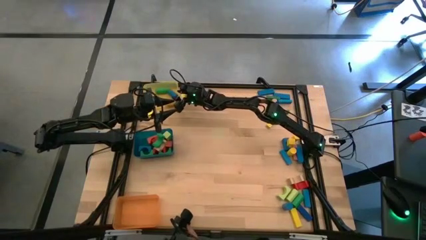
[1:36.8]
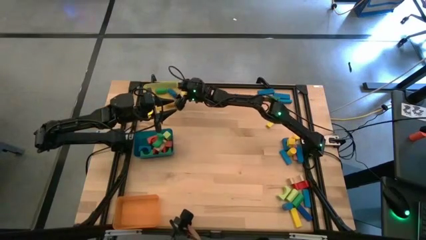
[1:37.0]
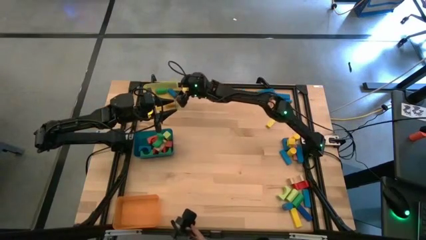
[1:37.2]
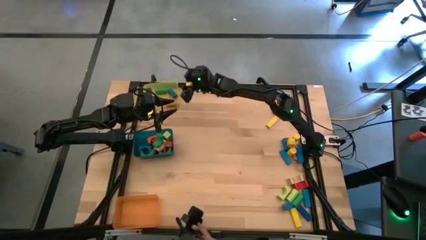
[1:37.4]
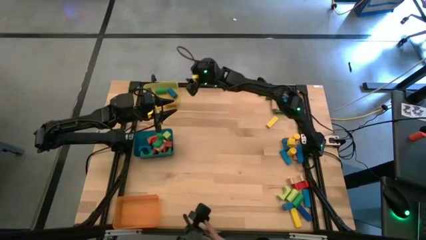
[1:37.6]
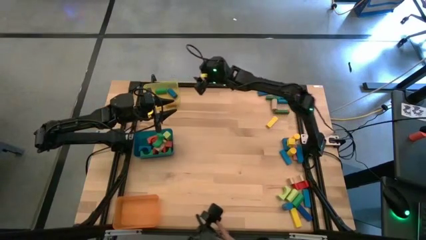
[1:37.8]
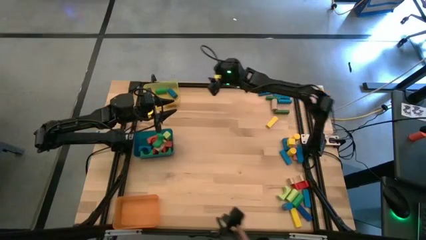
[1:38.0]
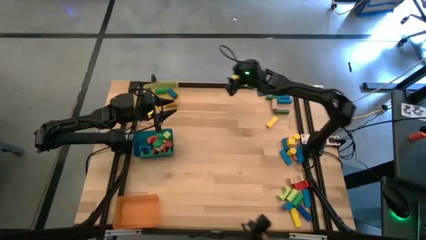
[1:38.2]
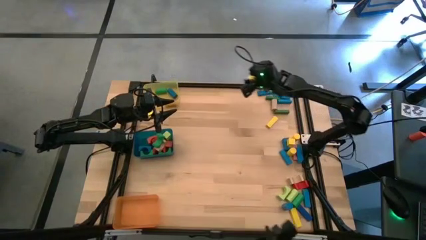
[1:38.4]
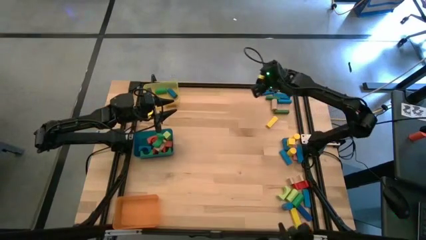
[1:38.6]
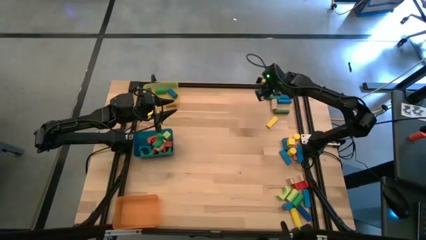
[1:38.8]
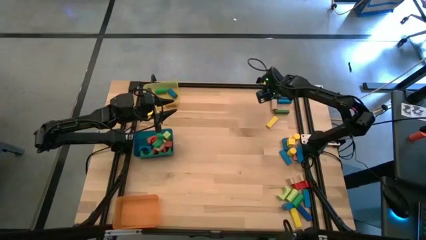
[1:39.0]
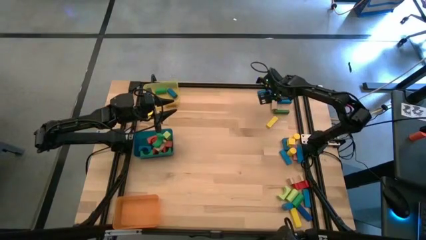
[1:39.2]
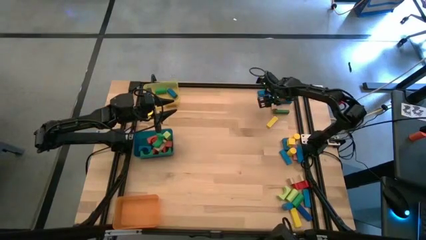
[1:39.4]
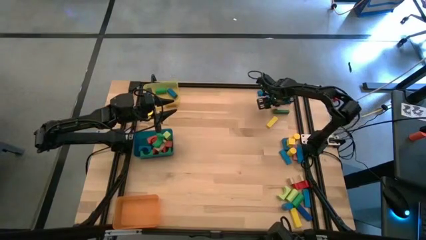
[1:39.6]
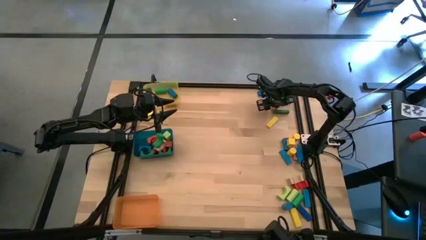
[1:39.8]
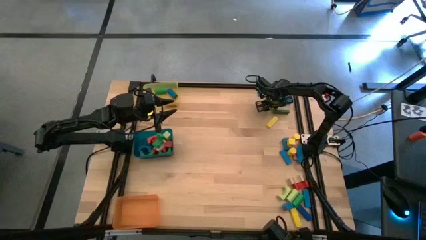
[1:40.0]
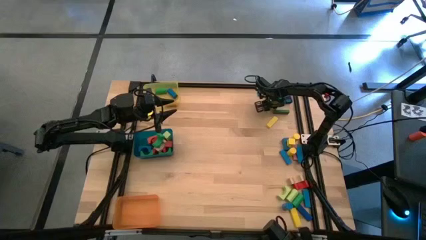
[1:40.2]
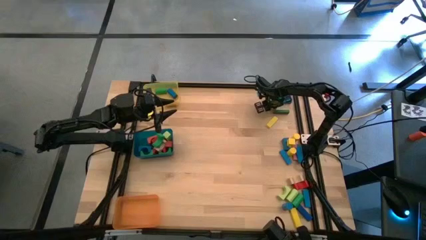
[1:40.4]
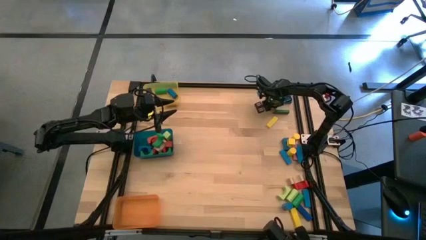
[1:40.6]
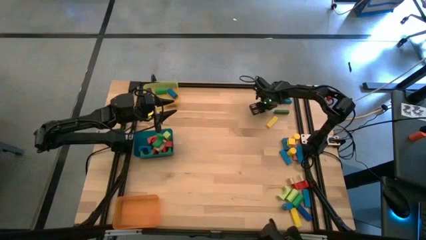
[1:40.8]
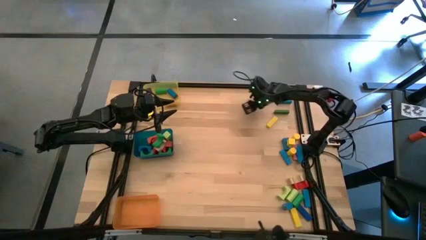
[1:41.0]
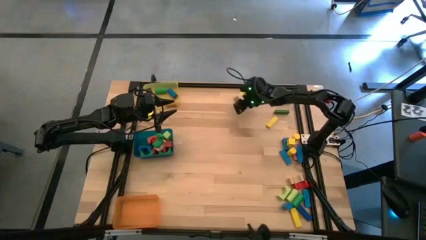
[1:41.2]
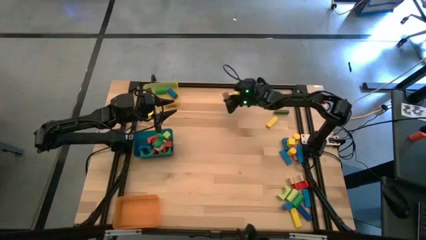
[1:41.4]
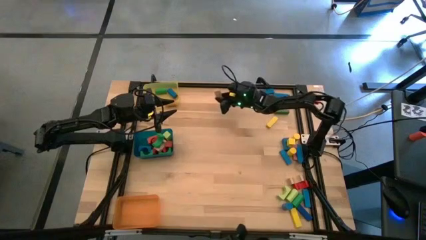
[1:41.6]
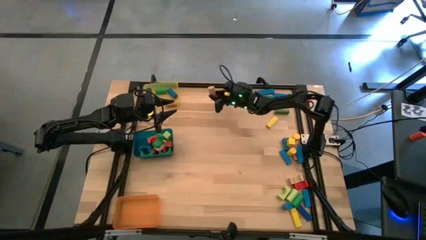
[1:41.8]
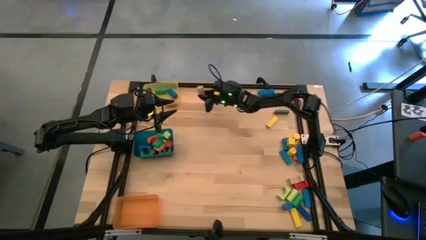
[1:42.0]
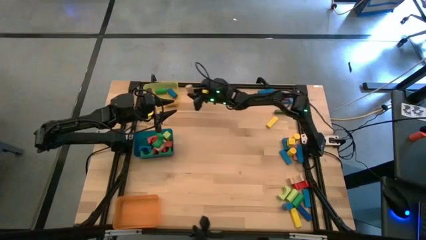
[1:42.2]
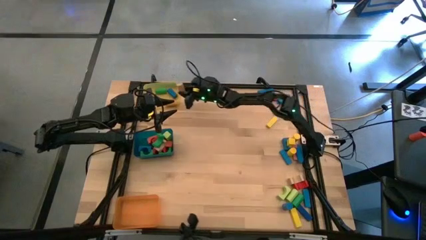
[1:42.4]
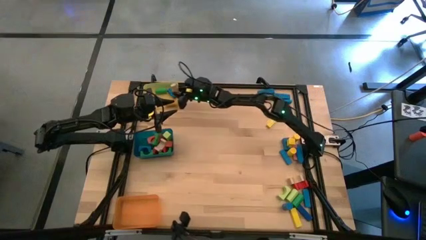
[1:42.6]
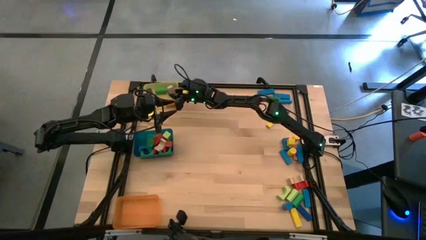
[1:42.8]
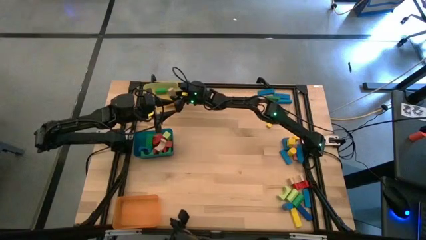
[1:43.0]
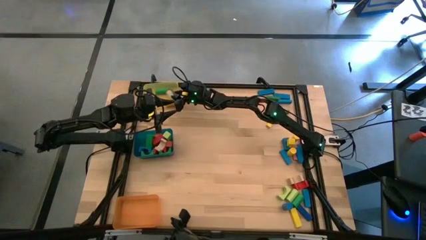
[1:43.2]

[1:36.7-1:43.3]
Task: Sort blocks by size
Put the brown cylindrical block into the yellow bin

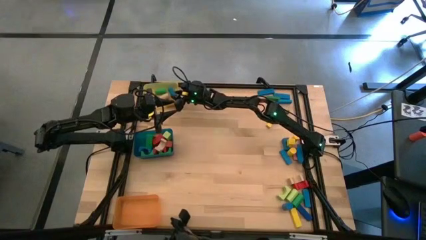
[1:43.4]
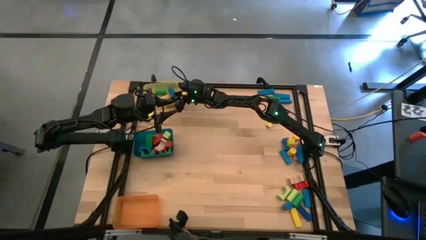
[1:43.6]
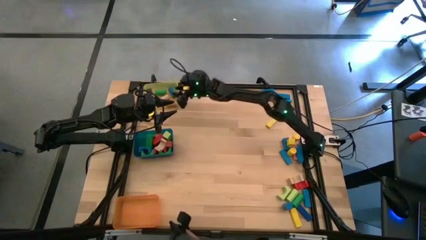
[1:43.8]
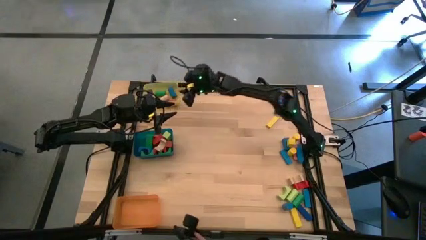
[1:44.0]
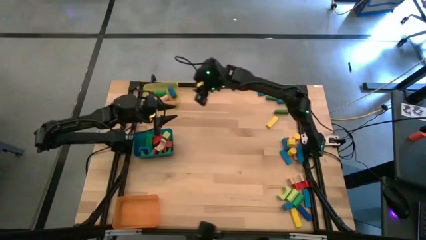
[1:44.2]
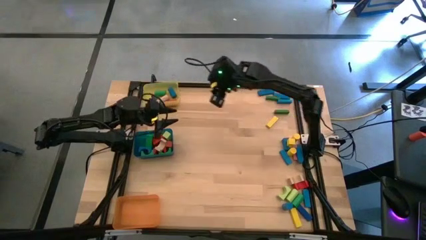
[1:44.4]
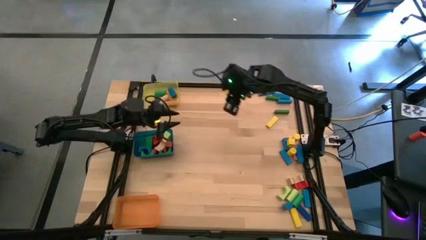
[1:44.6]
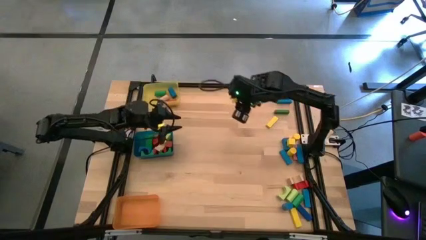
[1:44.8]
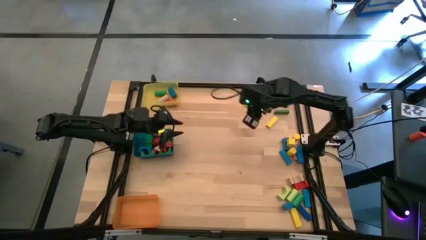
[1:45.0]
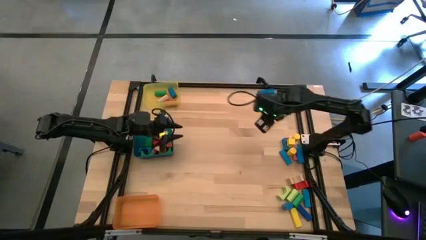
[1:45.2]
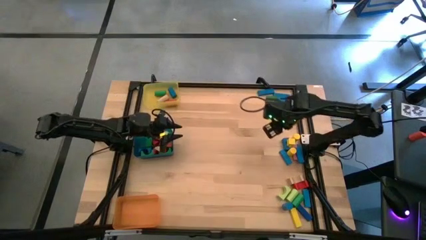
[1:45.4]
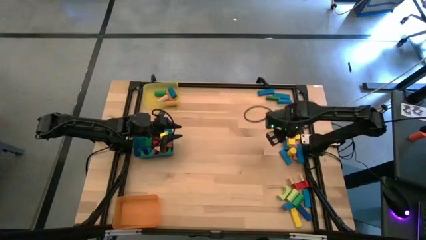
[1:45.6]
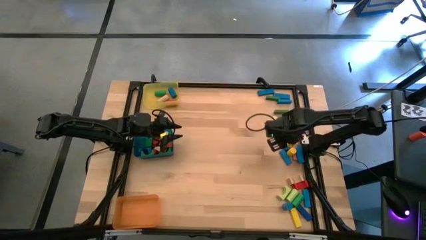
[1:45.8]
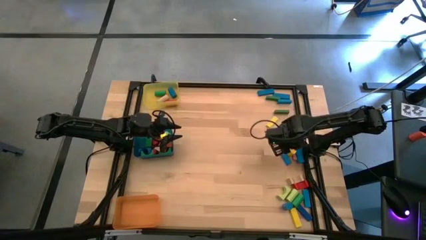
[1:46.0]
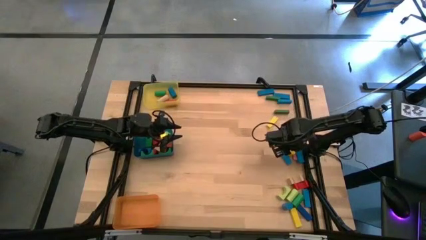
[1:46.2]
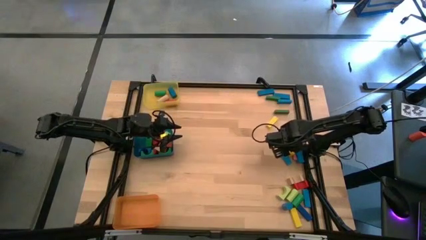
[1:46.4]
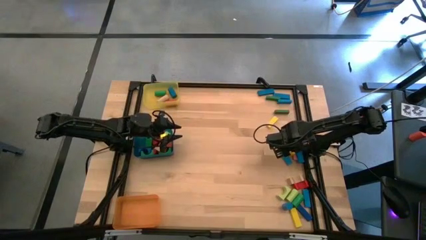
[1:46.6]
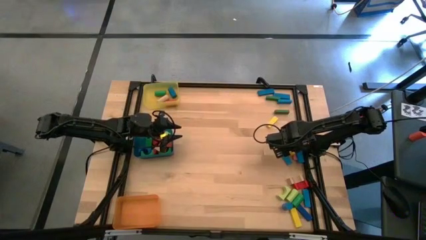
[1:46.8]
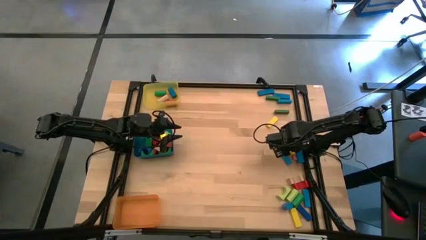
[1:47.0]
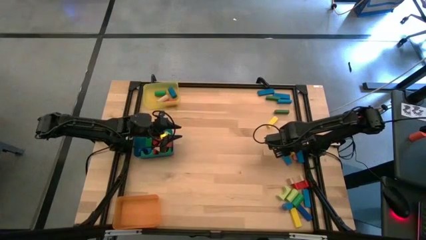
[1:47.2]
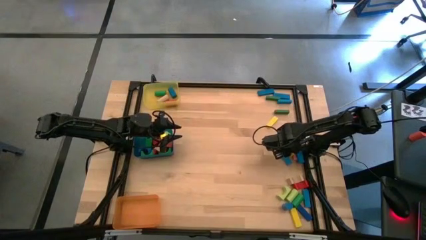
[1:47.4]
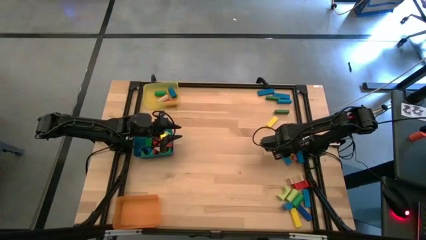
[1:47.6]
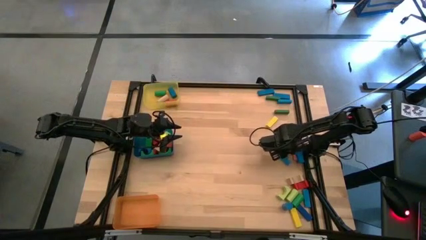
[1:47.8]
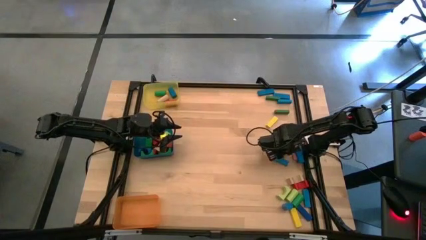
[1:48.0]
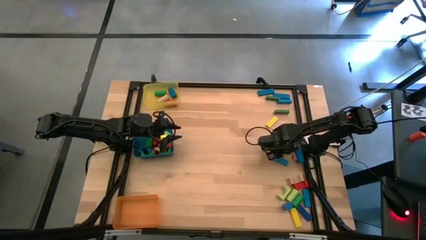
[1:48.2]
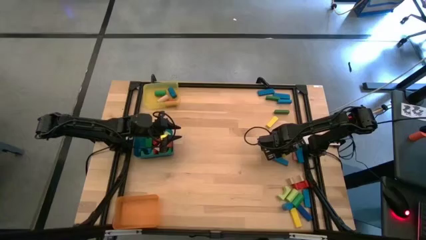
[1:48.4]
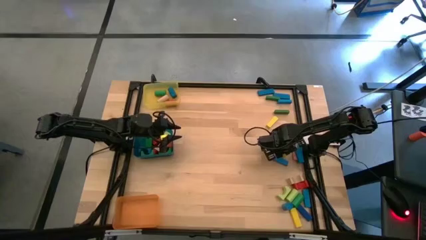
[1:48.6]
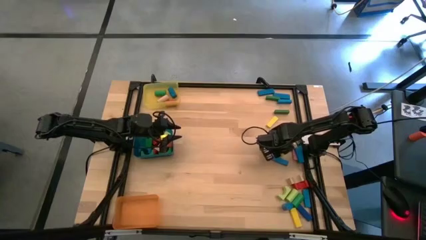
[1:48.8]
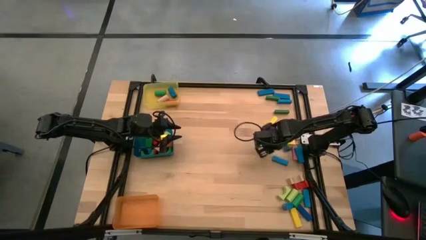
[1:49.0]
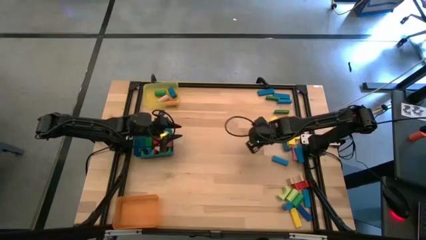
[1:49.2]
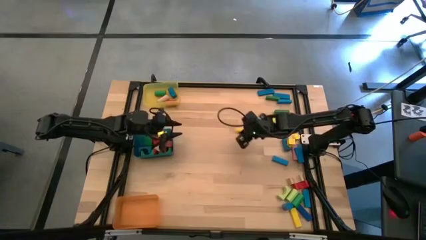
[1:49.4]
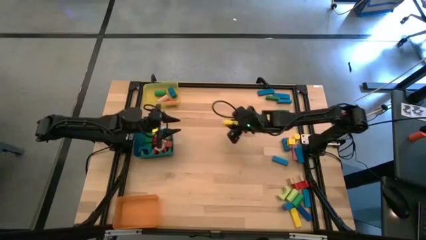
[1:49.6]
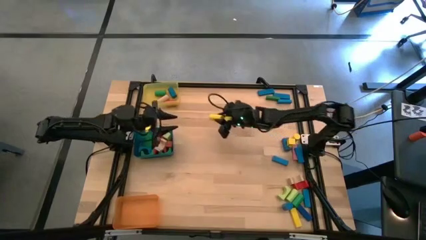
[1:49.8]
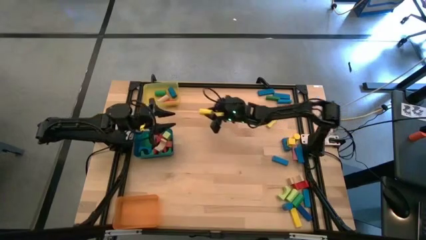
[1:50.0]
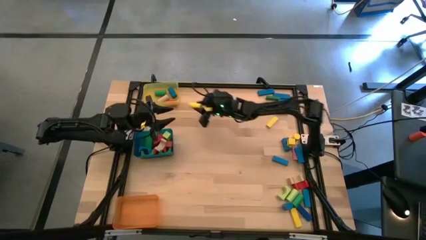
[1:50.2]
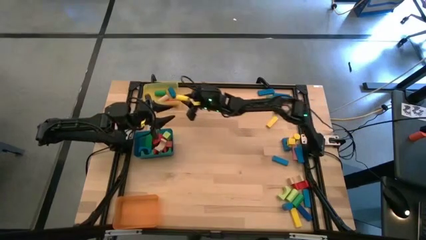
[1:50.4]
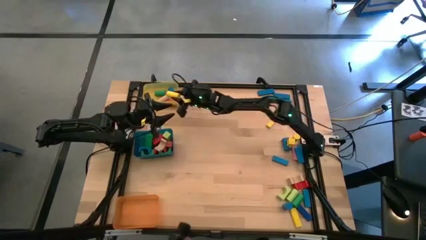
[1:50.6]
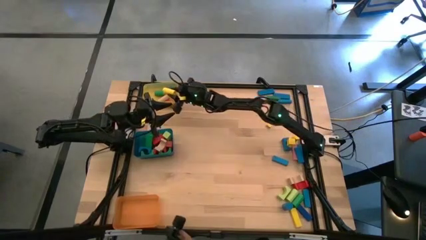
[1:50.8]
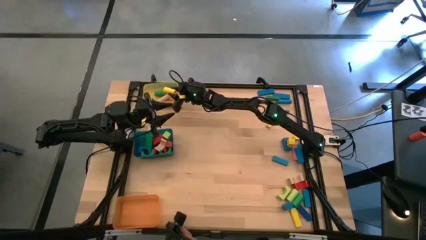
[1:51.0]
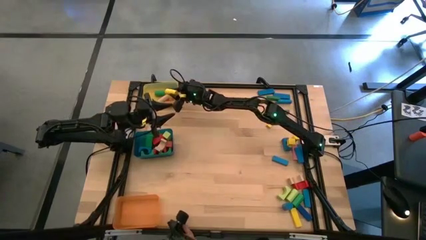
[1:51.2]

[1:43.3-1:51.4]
Put the yellow cylindrical block into the yellow bin

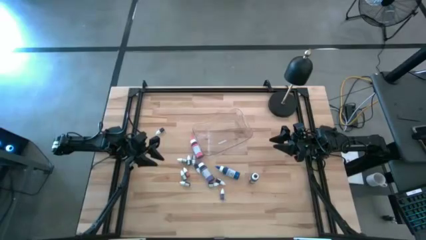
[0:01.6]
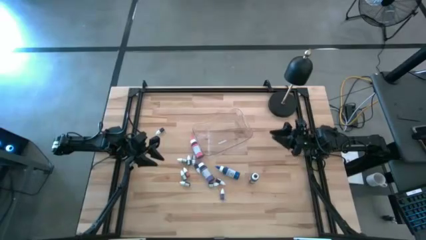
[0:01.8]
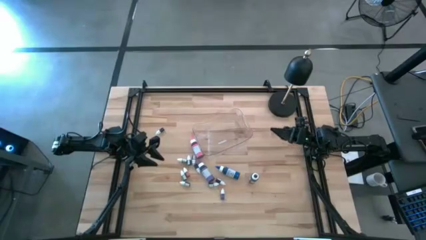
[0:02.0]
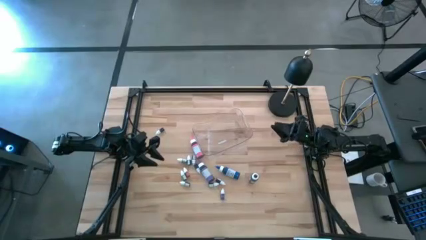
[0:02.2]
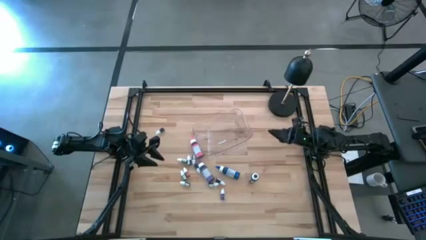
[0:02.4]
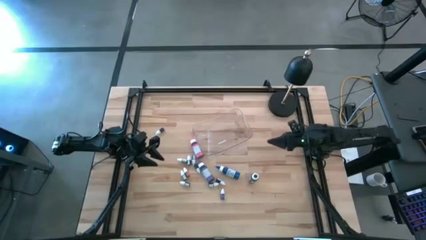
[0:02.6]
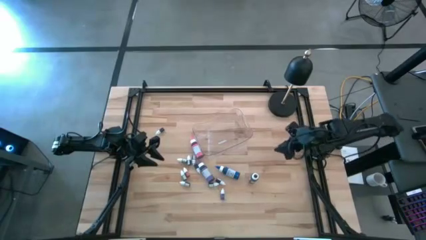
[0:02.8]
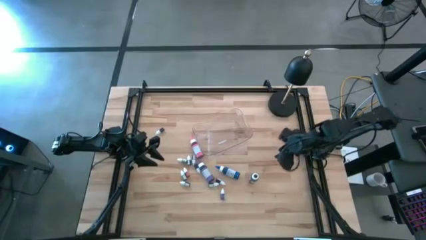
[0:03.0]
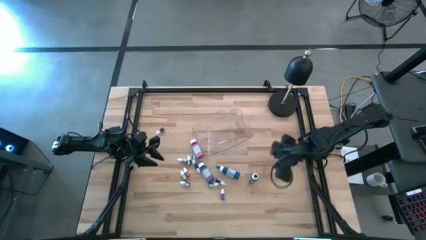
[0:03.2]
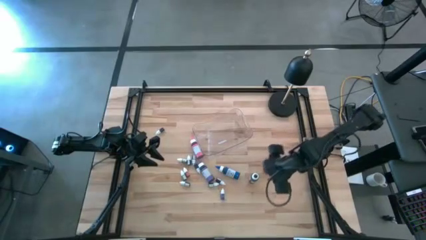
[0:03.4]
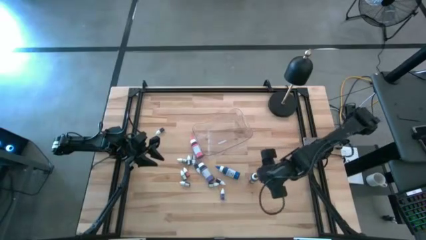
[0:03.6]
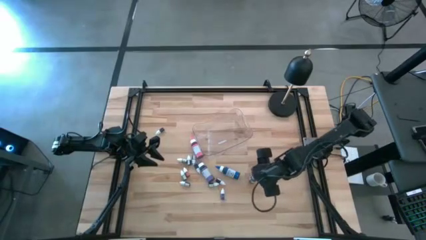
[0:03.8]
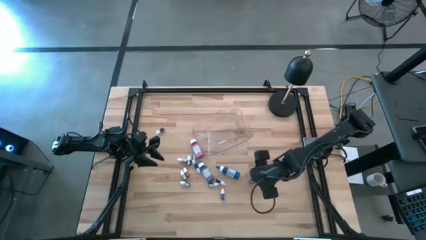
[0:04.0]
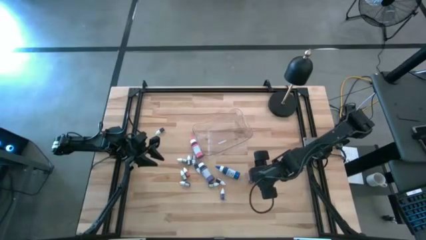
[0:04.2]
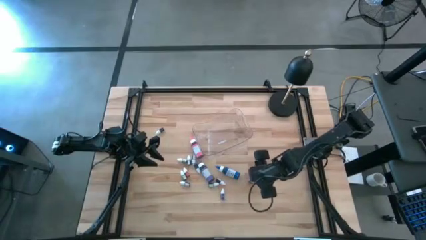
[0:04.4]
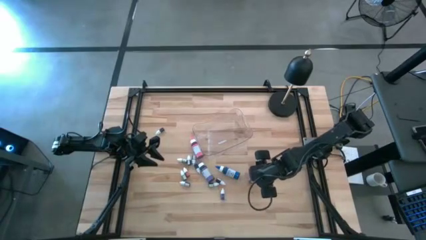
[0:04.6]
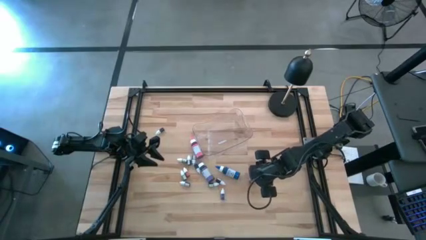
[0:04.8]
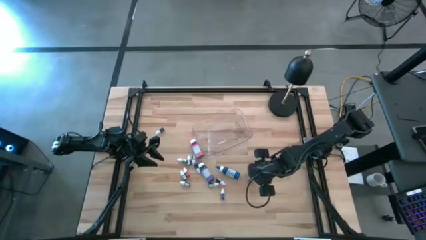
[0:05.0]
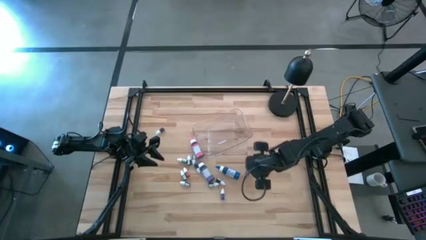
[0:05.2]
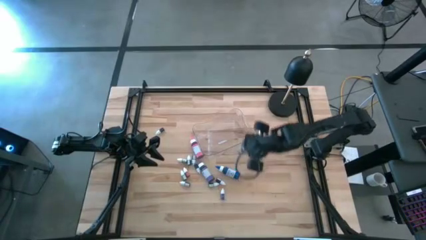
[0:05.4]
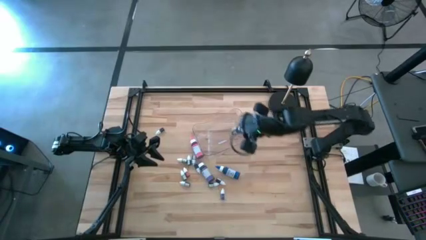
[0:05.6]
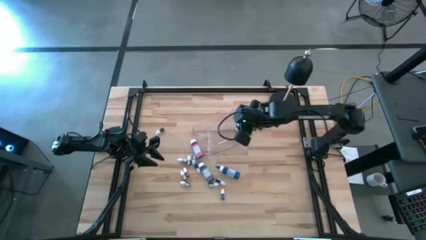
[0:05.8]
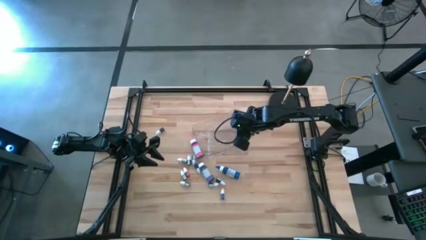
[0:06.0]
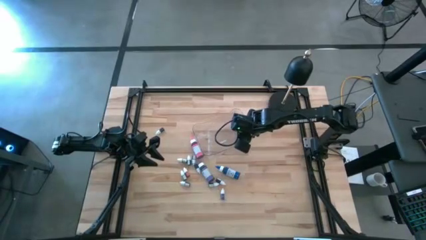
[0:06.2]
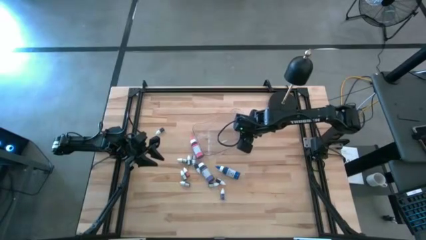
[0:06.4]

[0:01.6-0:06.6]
Task: Pick & Place food coloring
Put the big black food coloring bottle into the transparent bin
